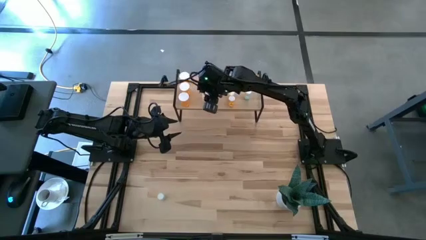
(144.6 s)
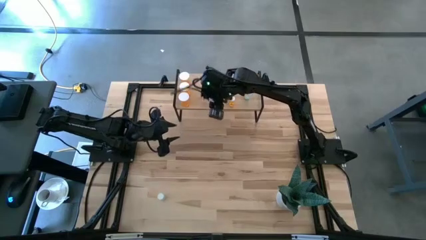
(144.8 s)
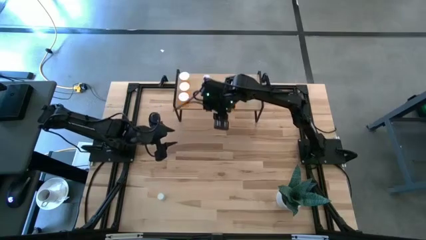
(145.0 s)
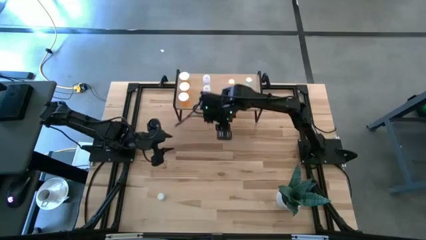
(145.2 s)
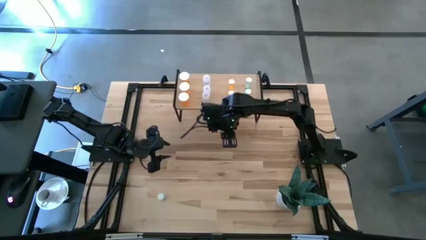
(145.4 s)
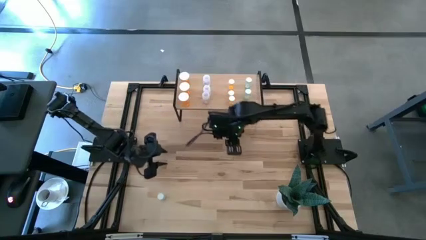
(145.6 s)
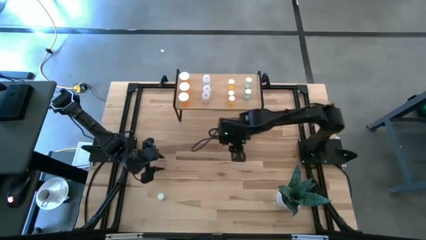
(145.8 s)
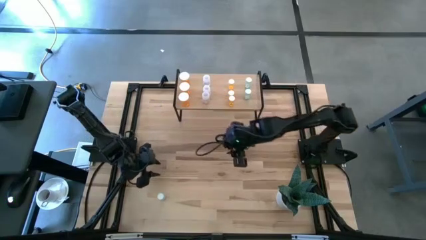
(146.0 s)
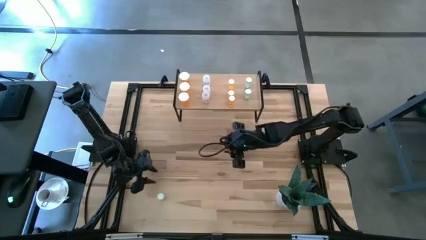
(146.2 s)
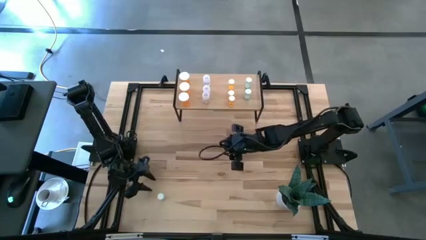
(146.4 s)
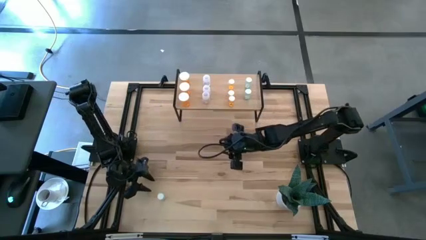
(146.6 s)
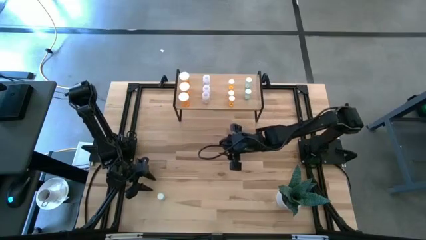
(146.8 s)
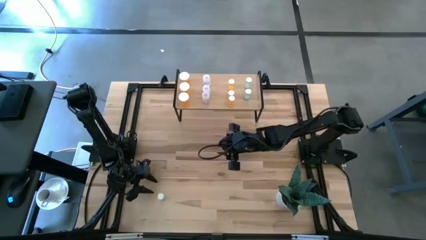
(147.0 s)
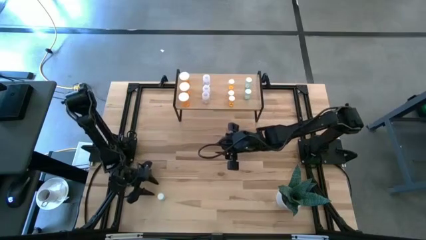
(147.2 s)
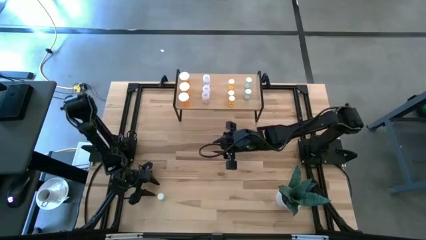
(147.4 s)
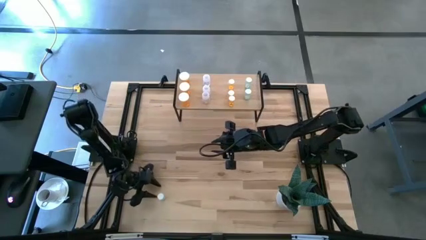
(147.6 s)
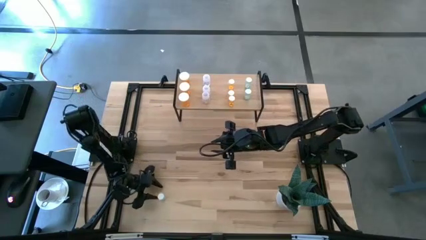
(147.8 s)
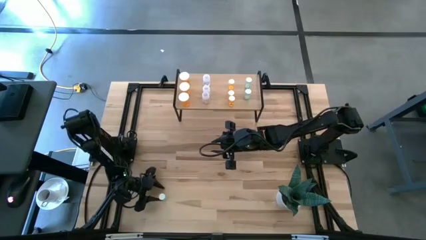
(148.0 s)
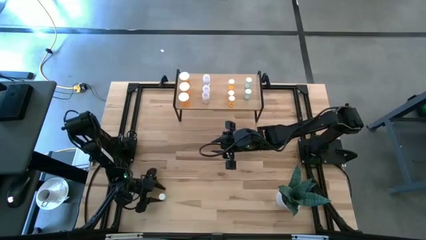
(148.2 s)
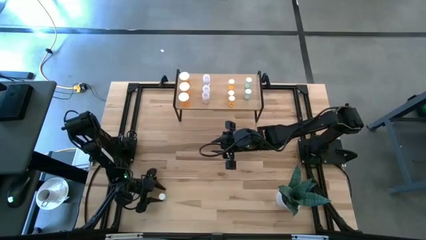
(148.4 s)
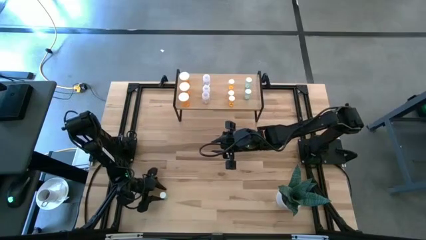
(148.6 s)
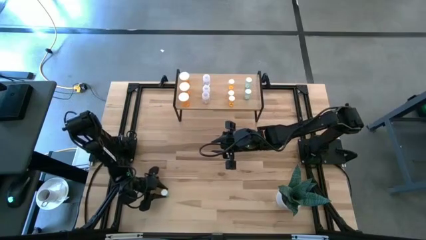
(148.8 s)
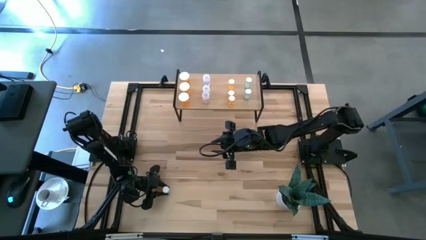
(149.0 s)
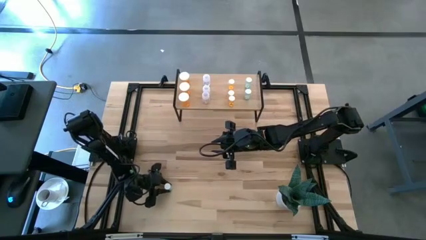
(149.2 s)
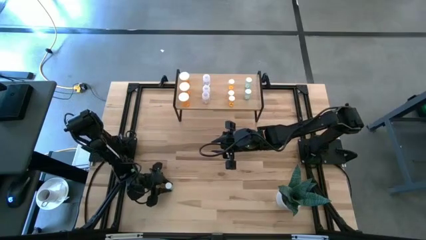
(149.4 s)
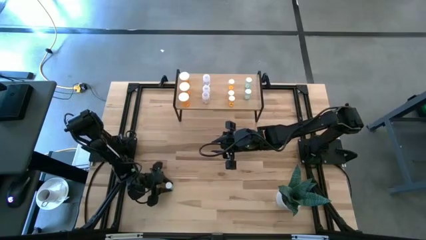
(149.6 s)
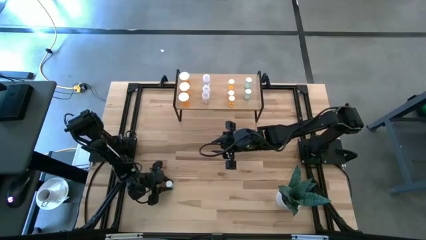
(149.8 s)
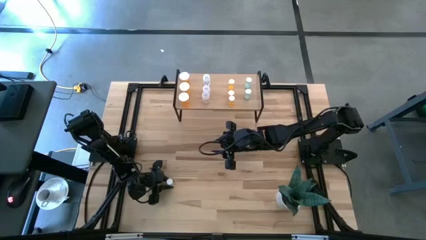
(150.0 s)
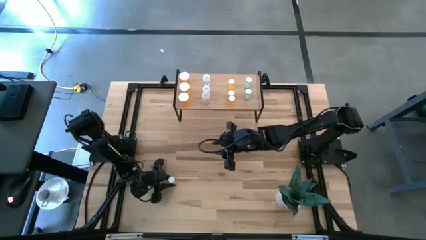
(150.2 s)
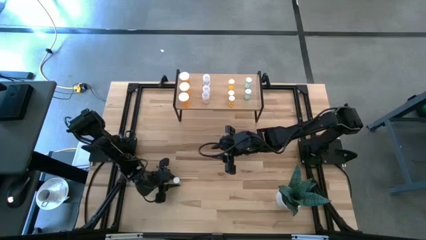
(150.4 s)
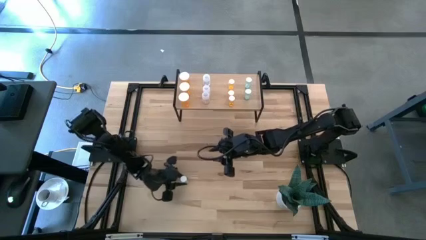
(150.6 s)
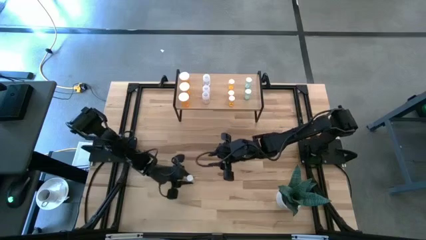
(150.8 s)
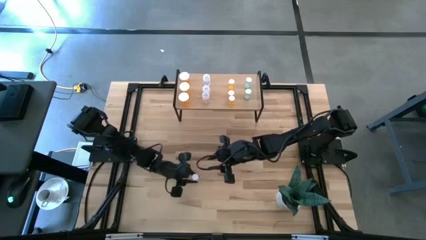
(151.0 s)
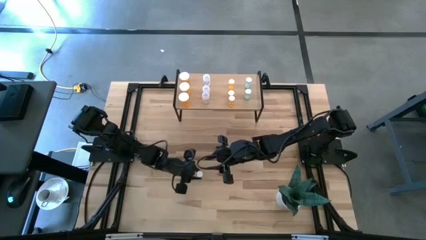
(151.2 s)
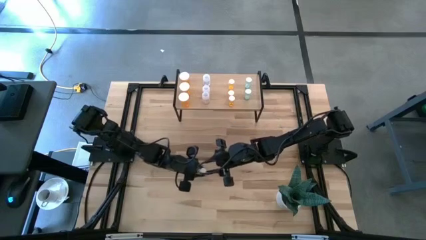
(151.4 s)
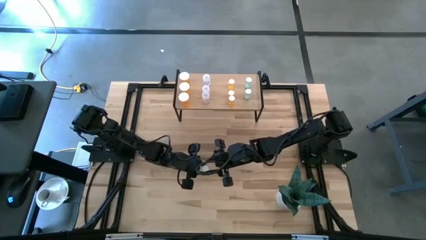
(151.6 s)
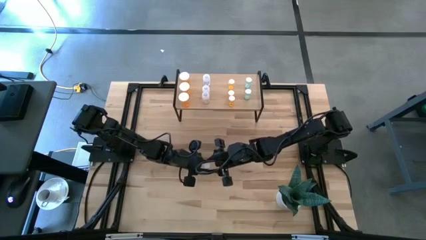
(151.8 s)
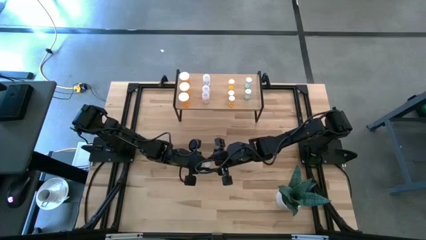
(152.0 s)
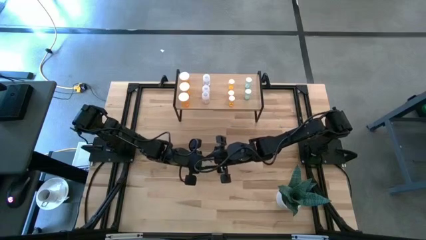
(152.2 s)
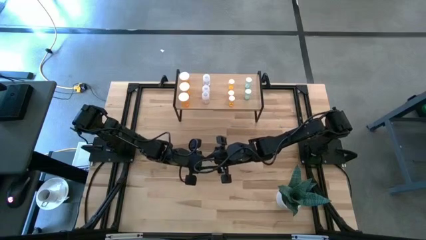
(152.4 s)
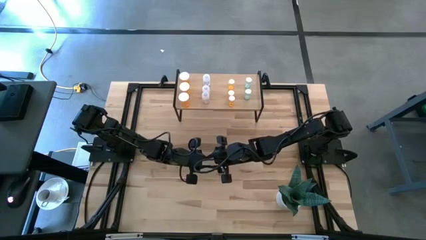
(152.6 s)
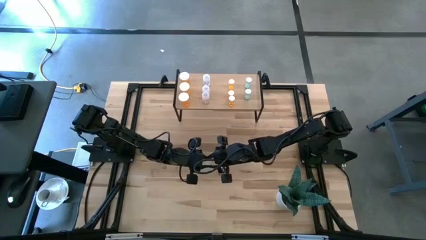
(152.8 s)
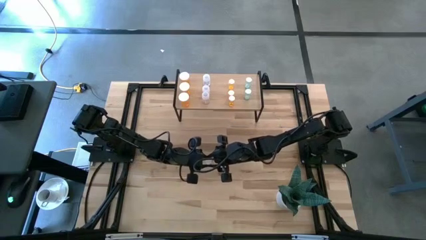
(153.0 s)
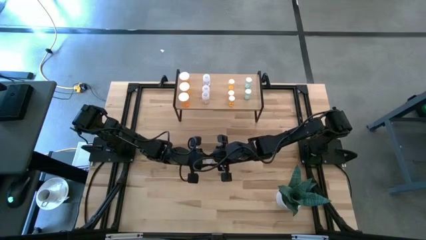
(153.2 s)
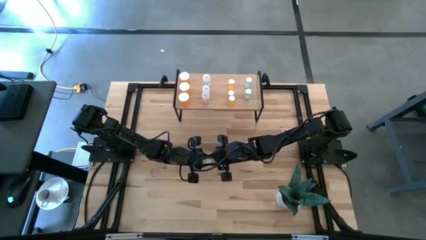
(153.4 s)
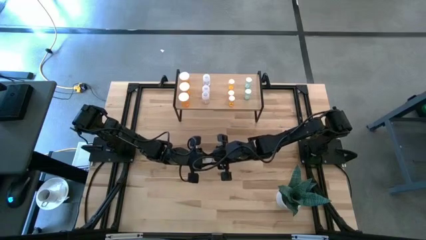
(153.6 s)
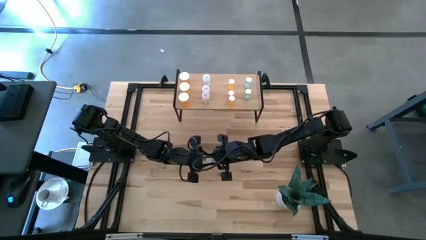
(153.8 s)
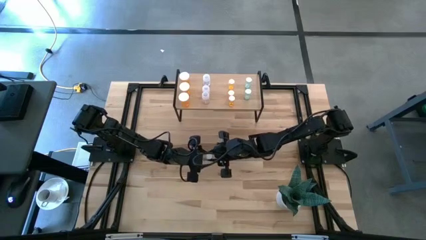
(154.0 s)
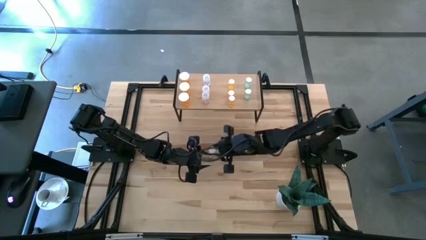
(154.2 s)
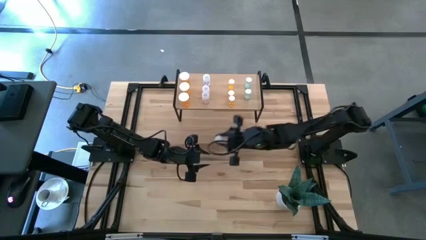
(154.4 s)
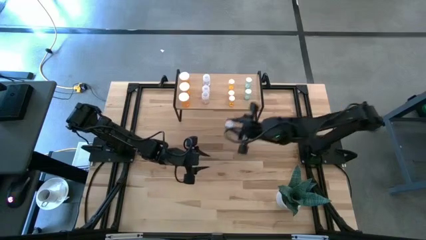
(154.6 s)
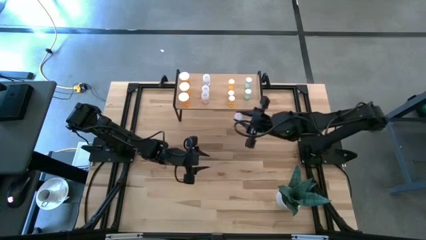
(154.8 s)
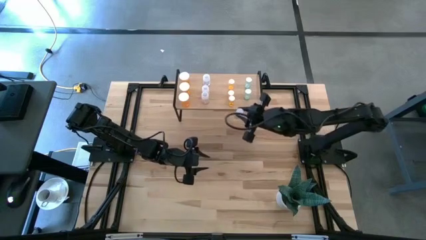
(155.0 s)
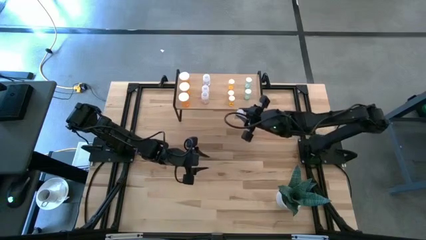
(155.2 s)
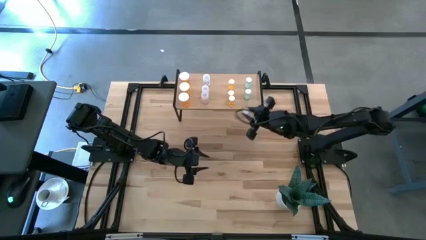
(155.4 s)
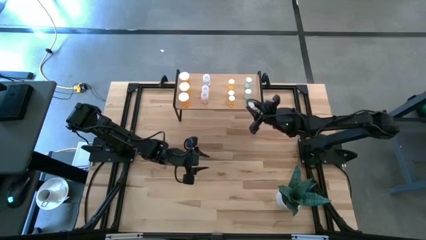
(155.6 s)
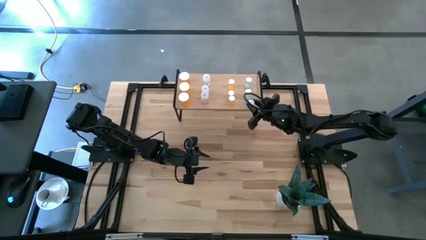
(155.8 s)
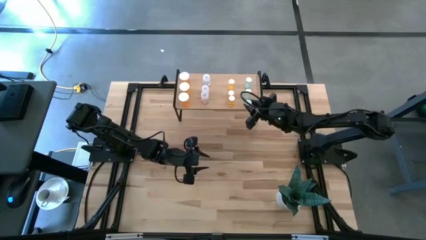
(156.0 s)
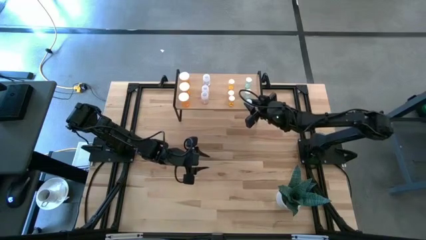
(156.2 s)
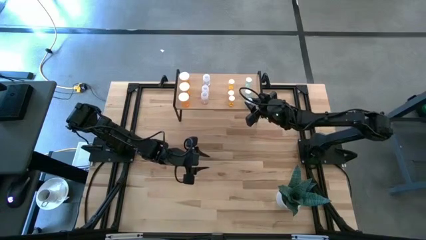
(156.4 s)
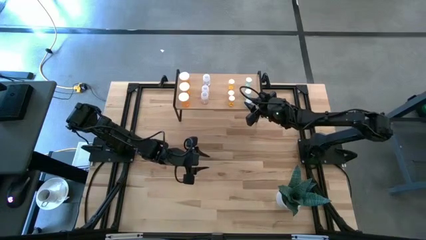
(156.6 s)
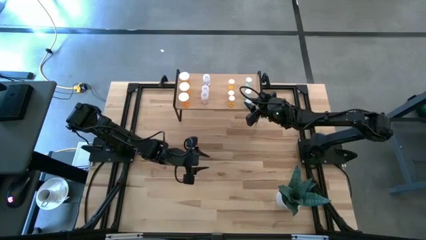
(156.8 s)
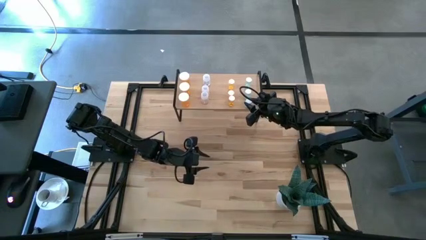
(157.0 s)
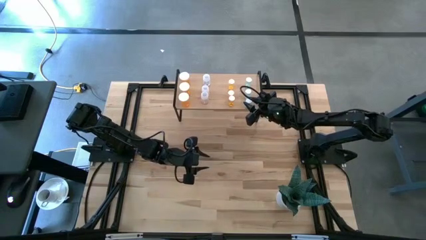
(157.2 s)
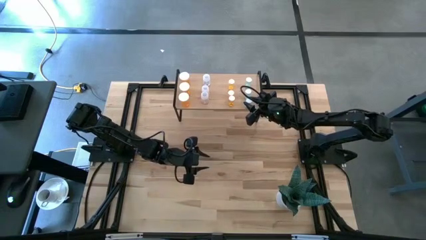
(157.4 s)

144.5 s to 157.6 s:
Task: Pick and place medicine bottles onto shelf by color
Put the dark green bottle on the shelf aligned with the other dark green pill bottle

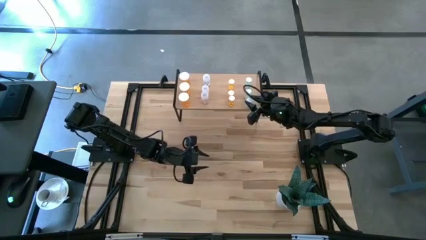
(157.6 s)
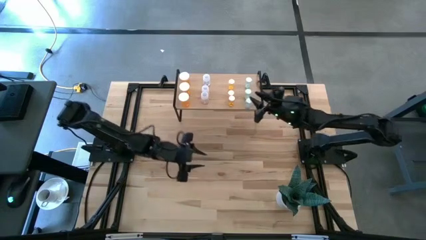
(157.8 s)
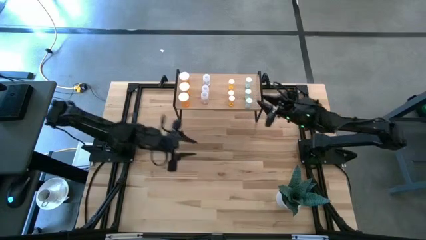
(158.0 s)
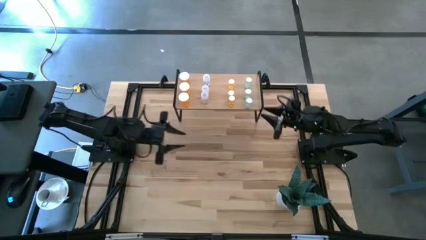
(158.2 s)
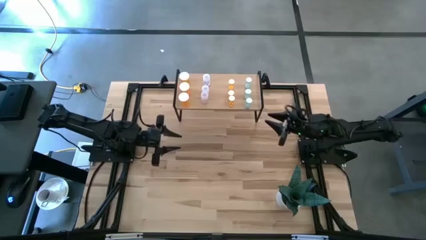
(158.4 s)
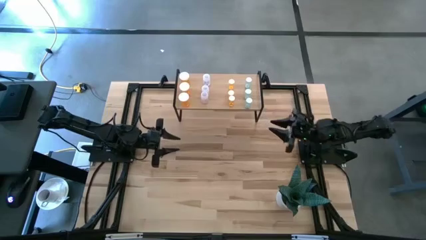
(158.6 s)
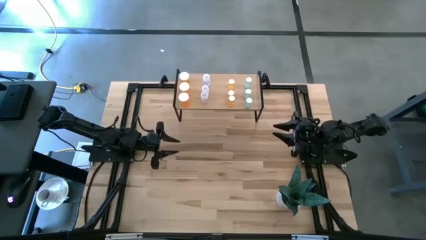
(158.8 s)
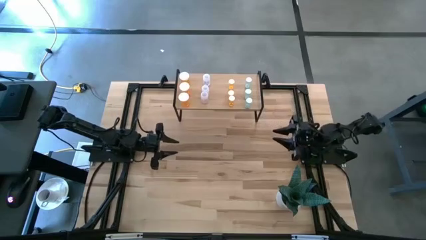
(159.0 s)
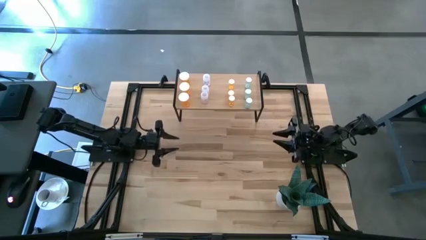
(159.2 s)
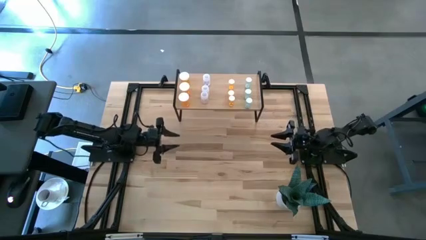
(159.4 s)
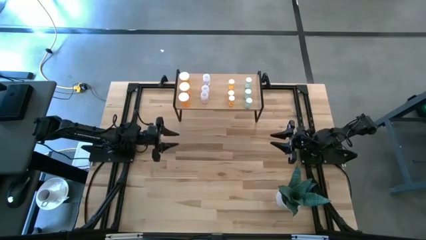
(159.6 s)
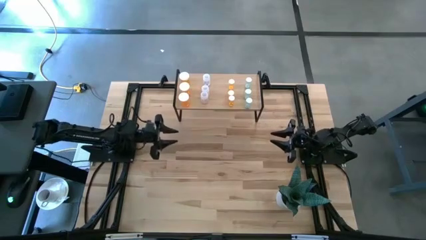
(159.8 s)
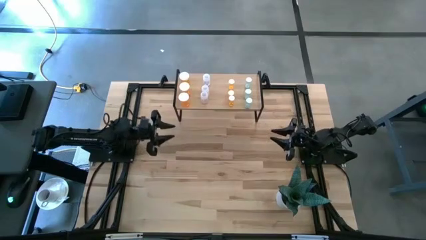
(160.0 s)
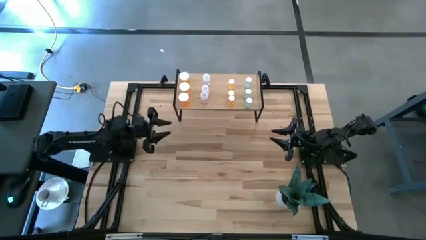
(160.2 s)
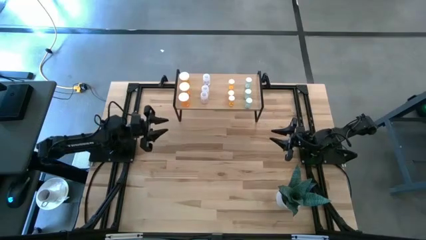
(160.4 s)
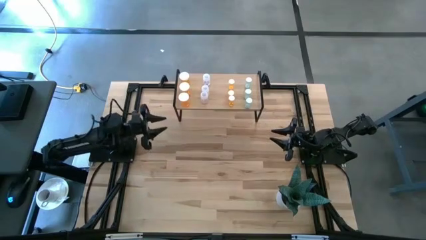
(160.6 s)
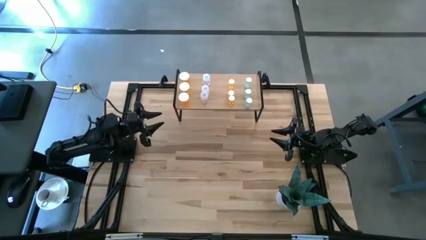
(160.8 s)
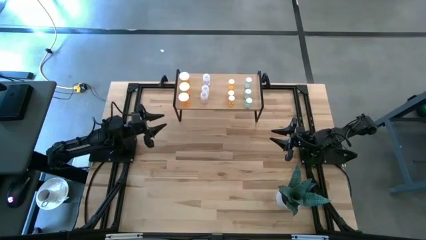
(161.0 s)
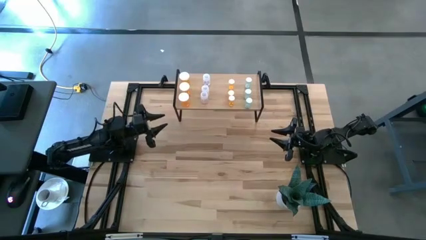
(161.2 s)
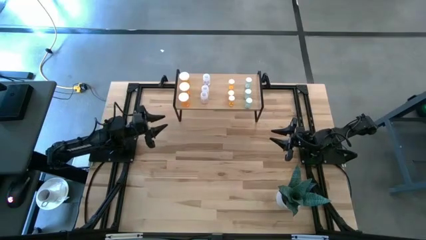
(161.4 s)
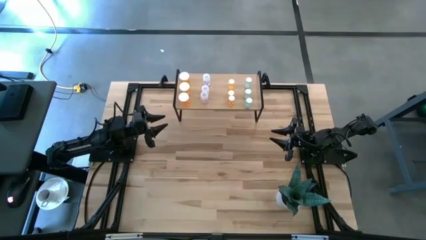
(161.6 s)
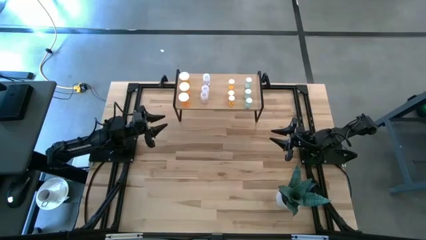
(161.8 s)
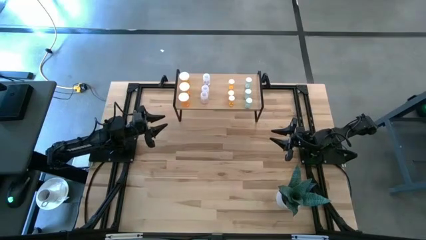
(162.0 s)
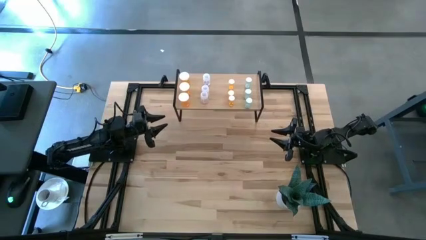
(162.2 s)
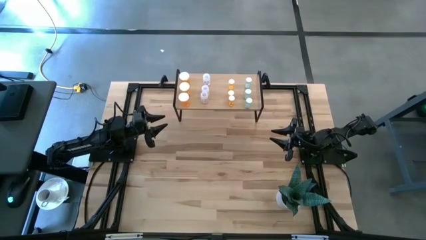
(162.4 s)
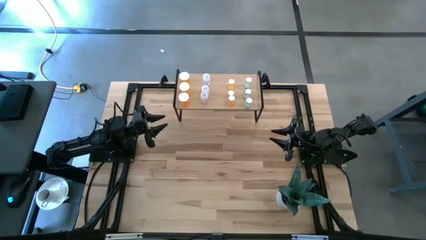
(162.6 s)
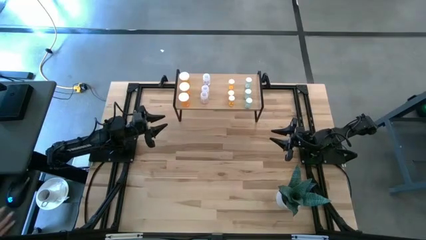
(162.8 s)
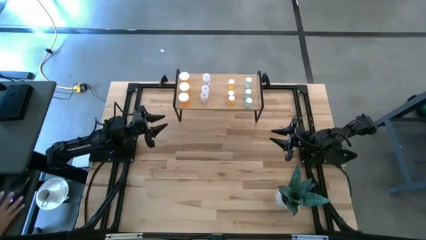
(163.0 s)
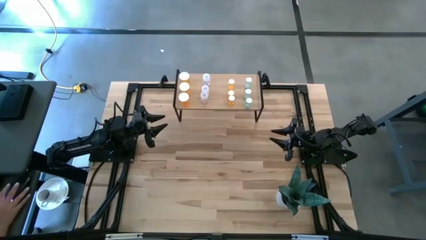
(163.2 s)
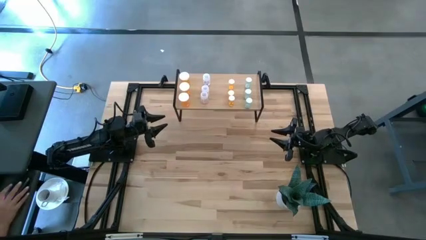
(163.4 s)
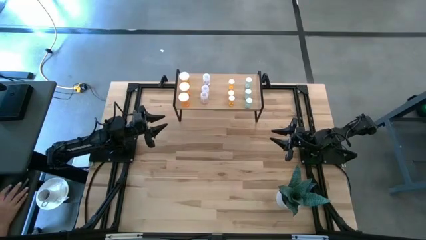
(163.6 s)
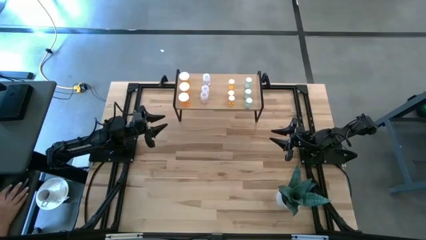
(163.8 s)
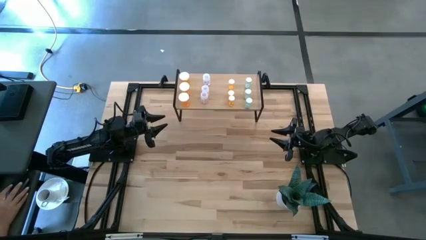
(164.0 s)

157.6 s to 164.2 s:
Return to Home Position
